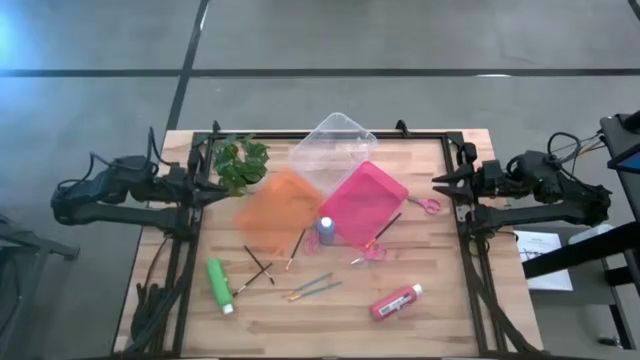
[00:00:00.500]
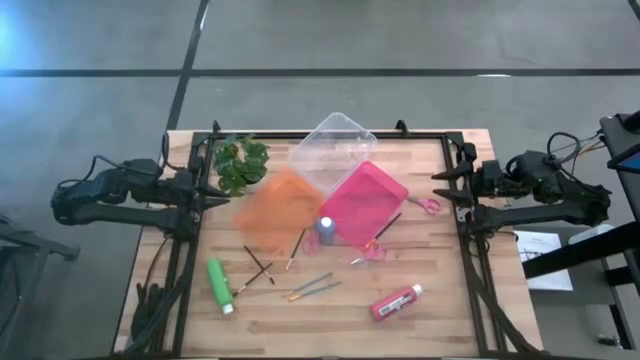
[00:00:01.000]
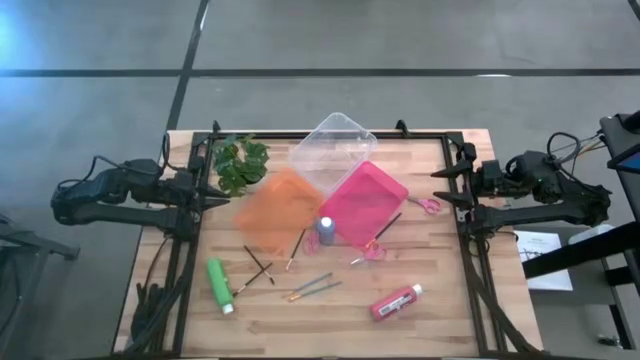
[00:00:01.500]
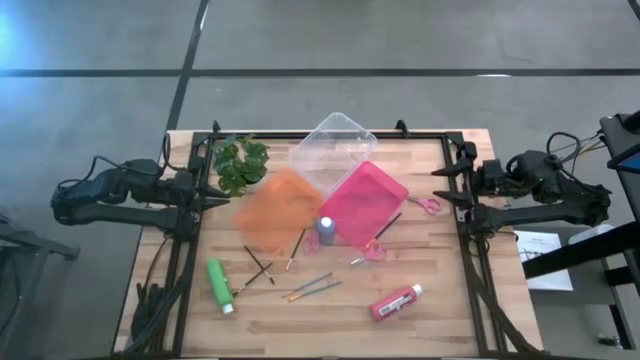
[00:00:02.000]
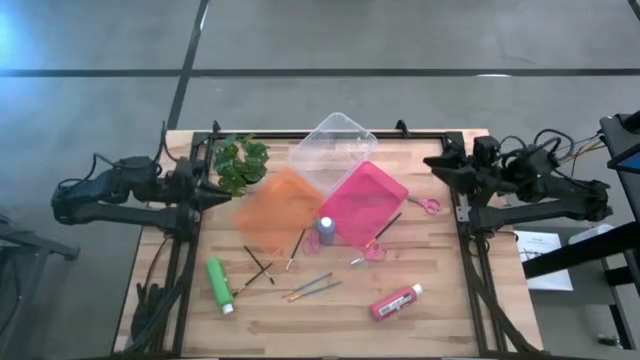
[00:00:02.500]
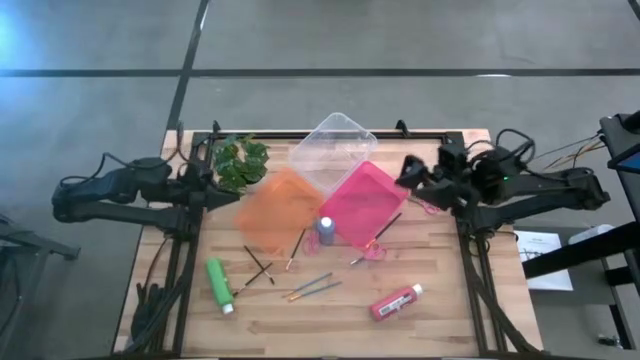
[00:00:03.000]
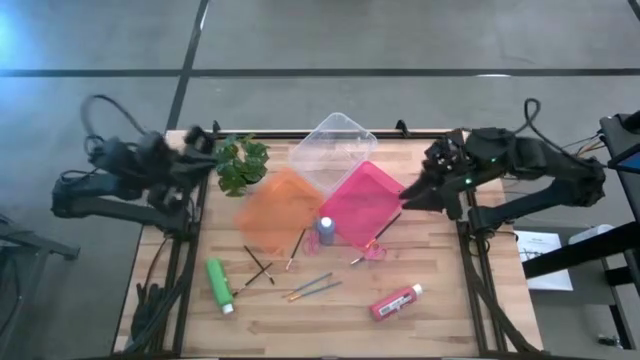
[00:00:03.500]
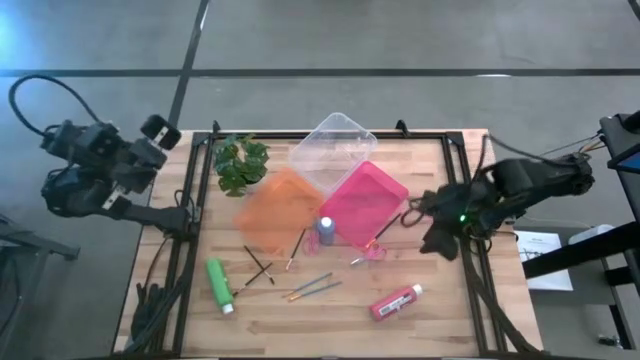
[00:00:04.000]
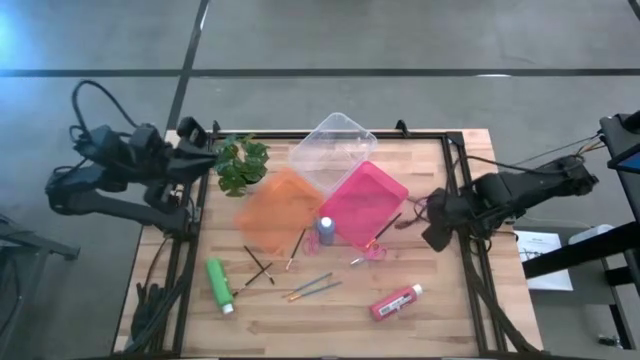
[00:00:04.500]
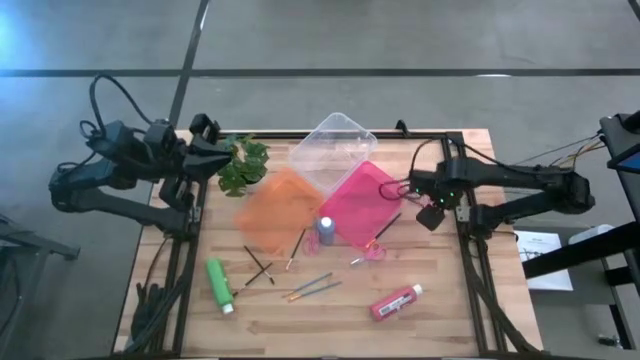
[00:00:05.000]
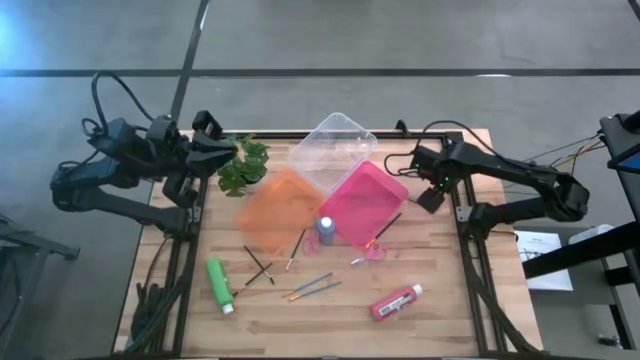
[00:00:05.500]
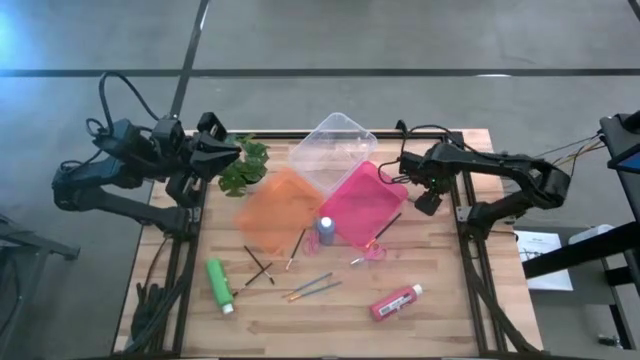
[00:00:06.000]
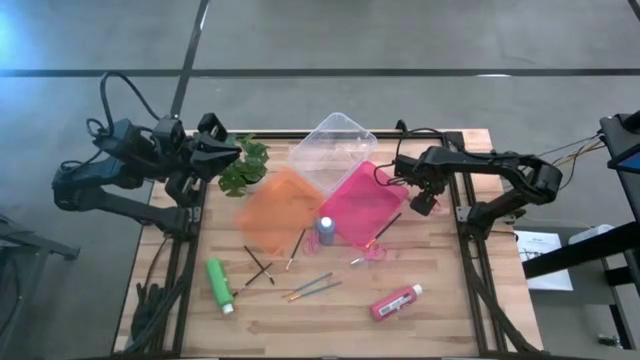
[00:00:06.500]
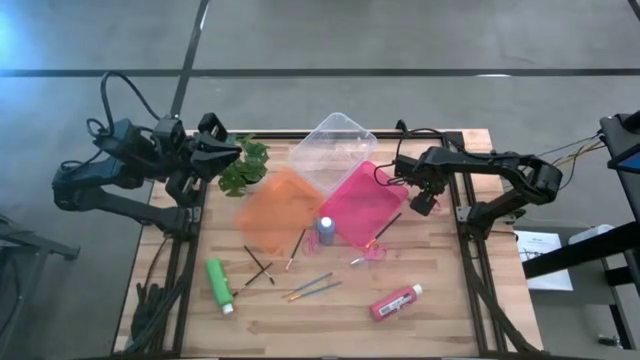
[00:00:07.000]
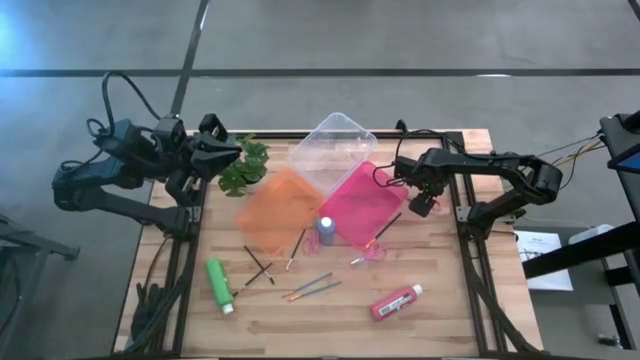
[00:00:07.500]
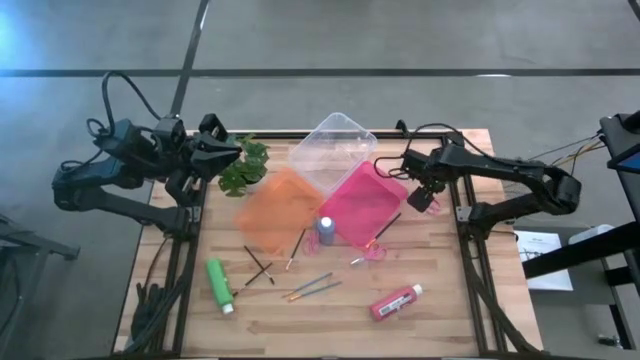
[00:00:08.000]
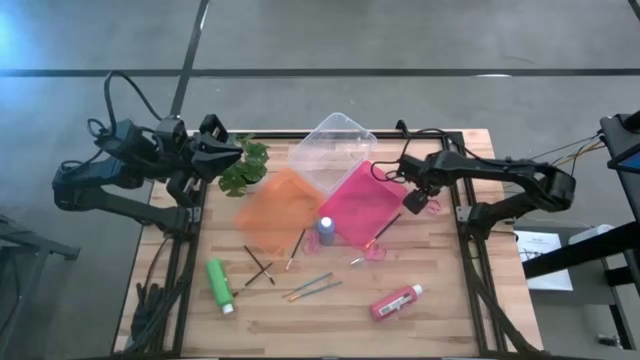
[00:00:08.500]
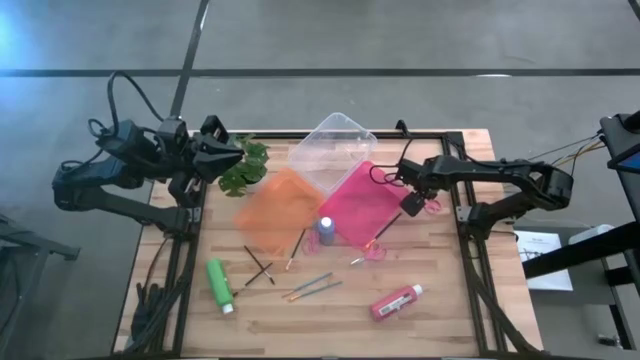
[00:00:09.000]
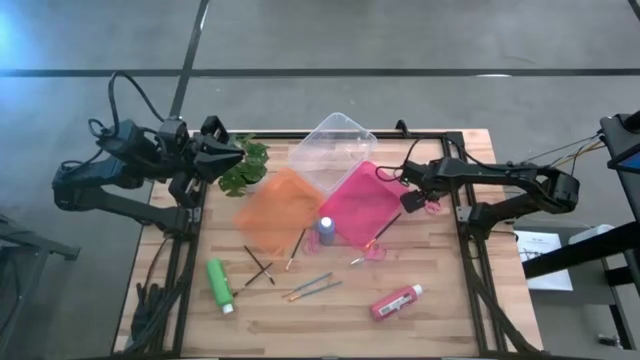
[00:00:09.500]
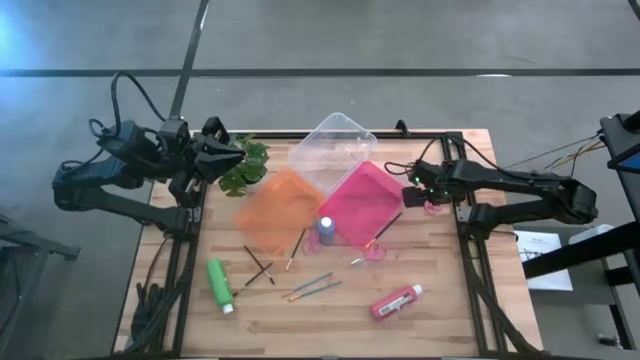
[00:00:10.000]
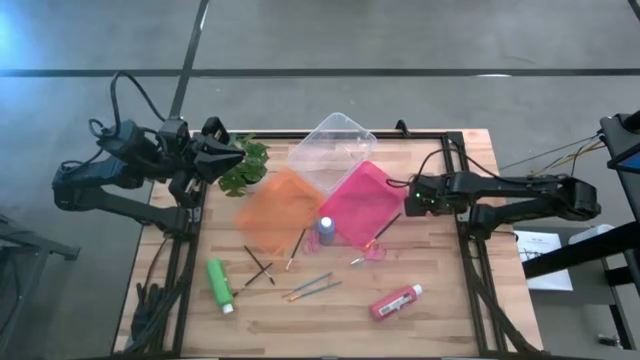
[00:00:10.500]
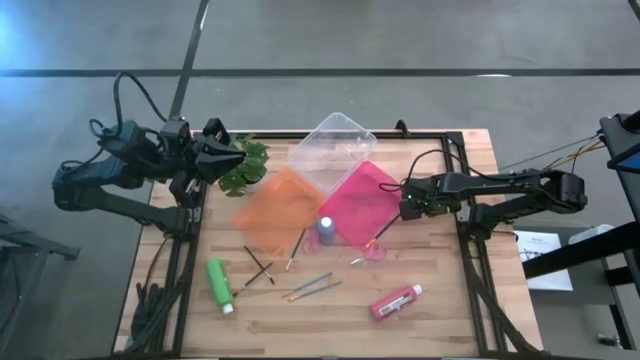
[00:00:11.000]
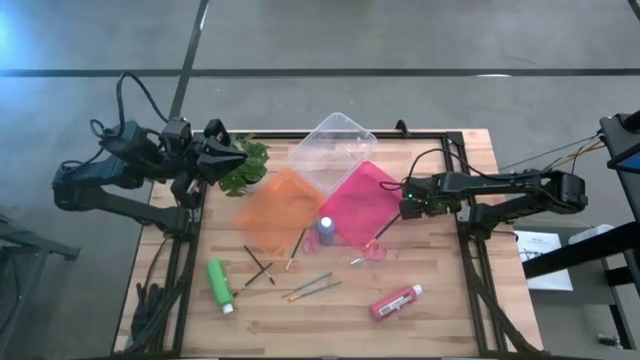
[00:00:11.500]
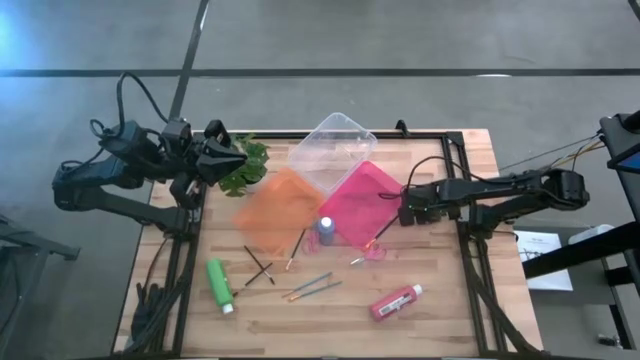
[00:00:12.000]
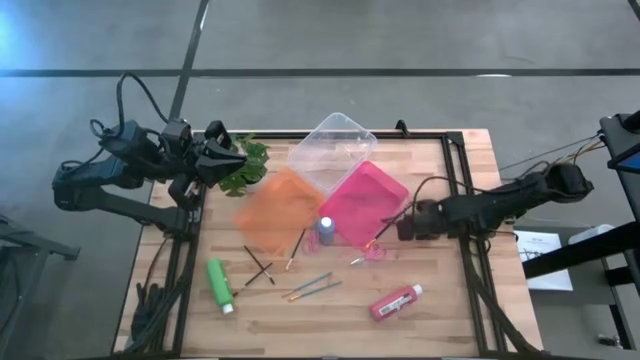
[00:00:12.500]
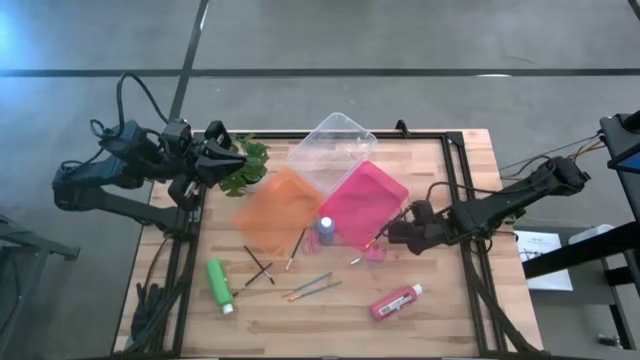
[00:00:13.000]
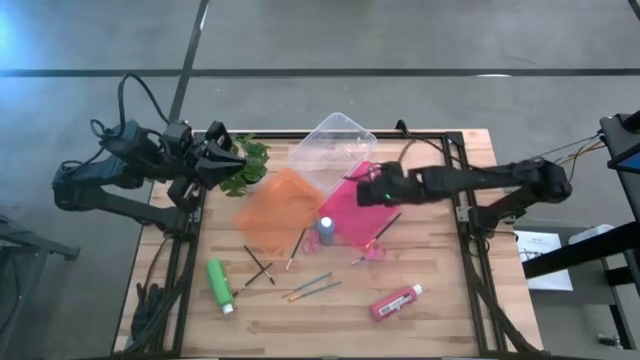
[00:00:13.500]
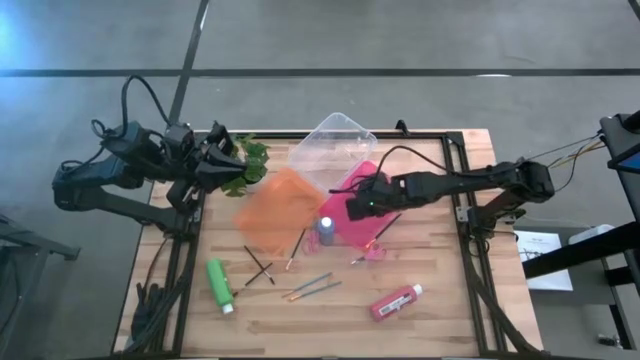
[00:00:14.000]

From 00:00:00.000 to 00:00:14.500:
Task: Pick & Place Paint Supplies
Put the right pink scissors into the pink bin

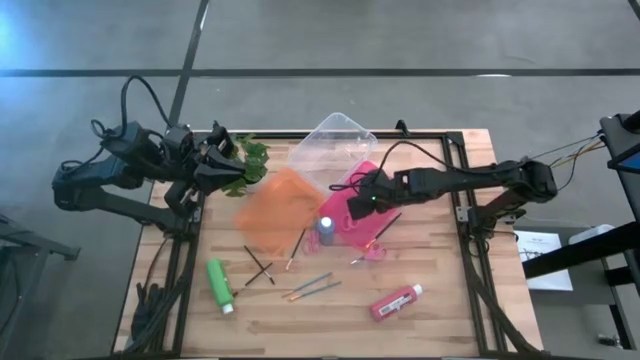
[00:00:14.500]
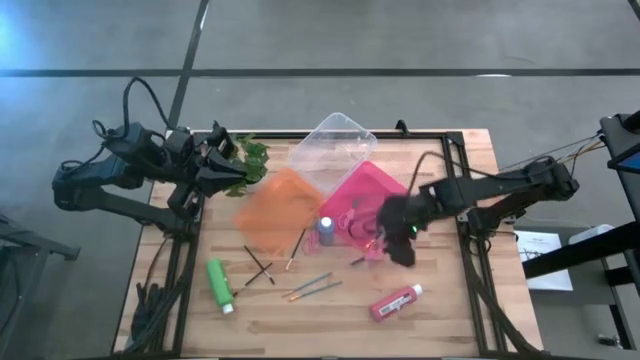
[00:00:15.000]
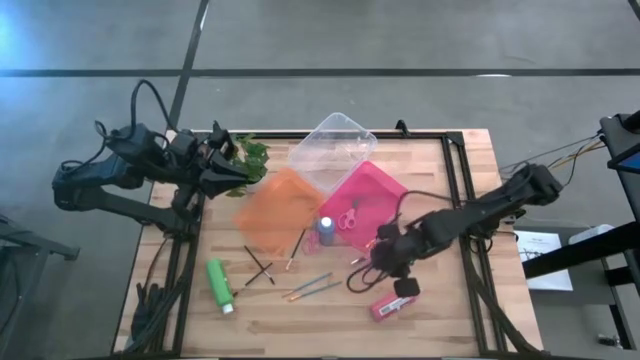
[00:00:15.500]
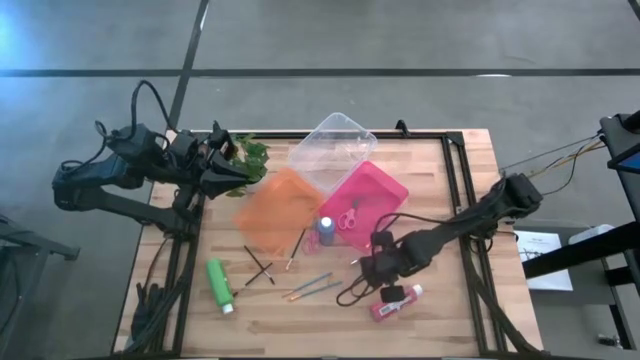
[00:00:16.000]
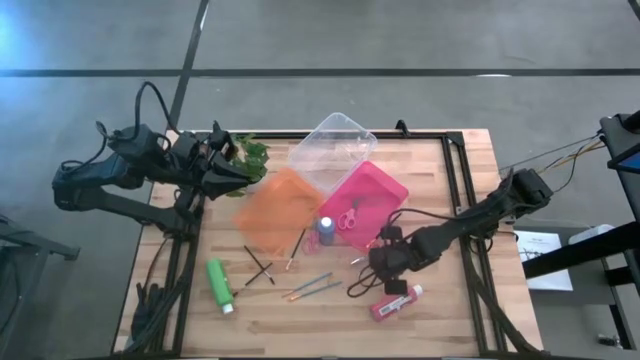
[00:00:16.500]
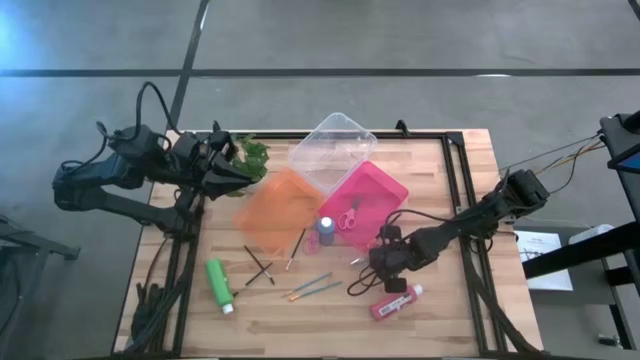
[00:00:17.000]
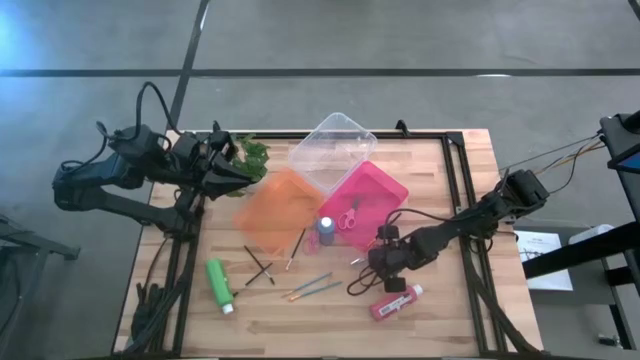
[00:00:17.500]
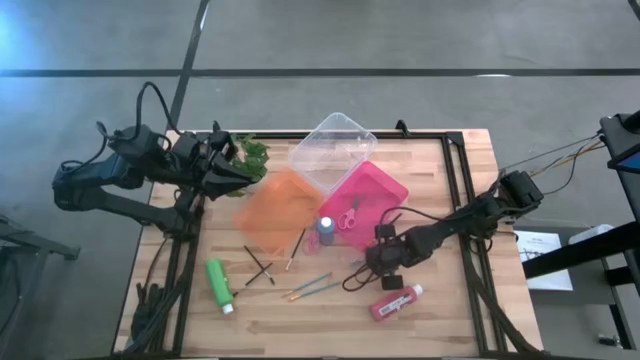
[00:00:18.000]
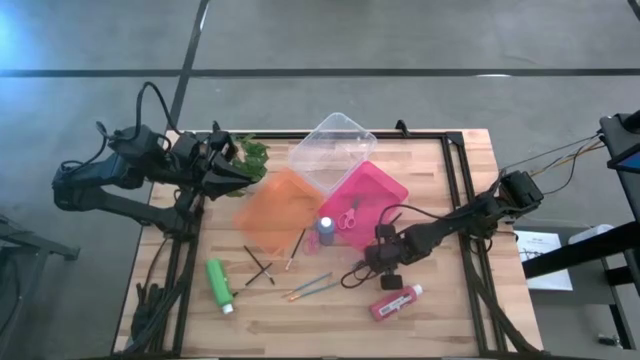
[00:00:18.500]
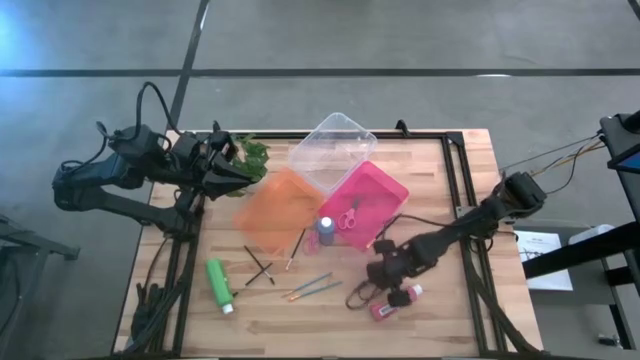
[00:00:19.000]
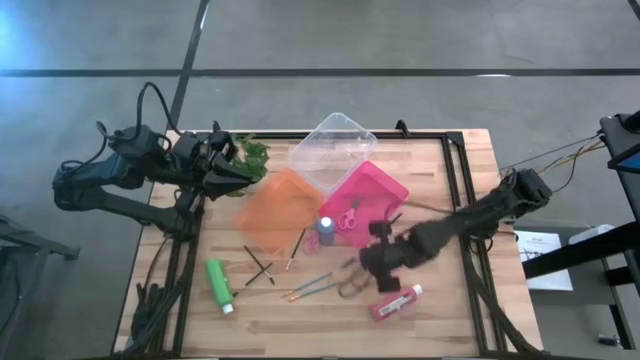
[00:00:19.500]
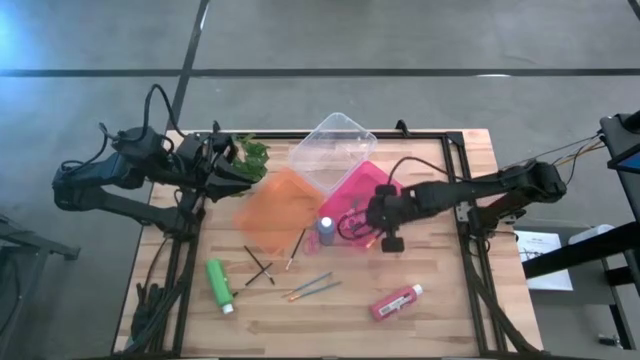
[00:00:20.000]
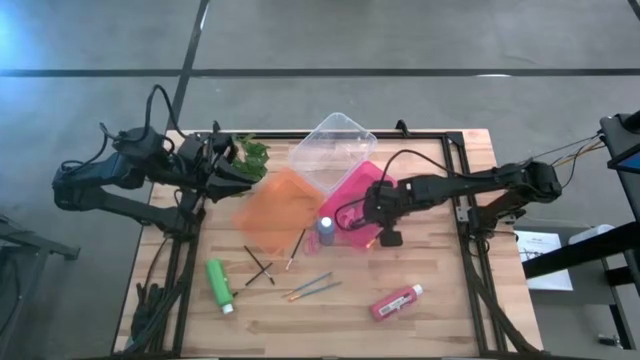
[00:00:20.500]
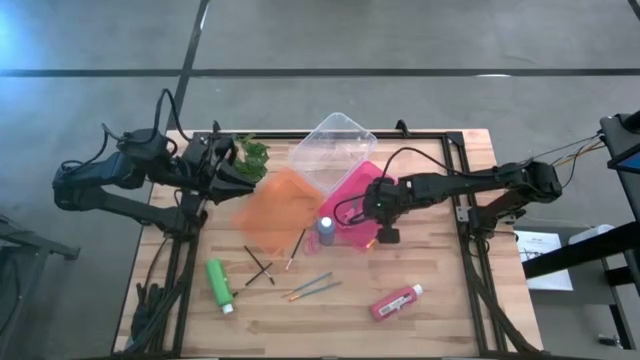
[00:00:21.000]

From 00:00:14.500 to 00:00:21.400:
Put the right pink scissors into the pink bin
